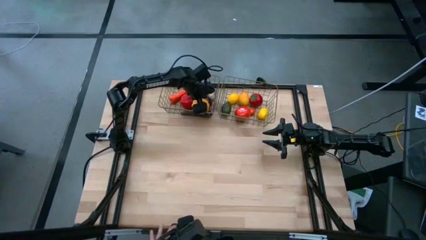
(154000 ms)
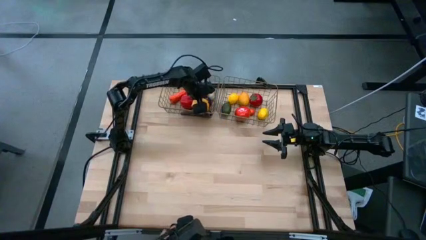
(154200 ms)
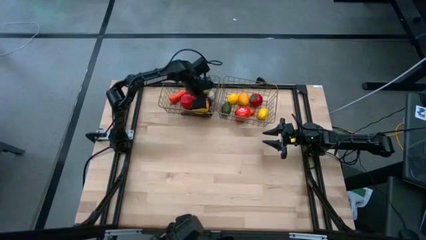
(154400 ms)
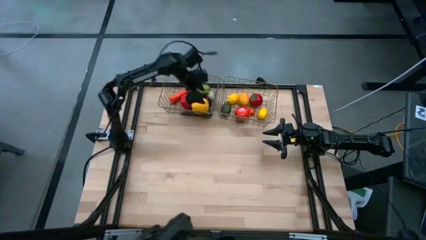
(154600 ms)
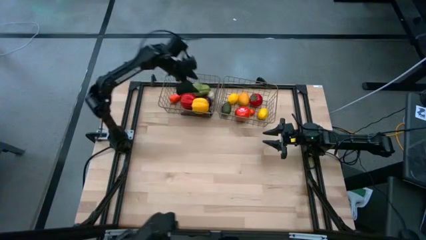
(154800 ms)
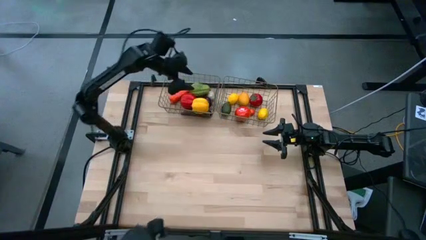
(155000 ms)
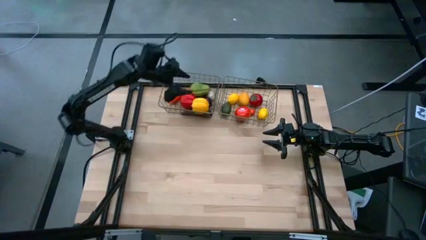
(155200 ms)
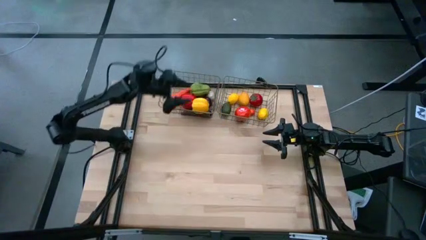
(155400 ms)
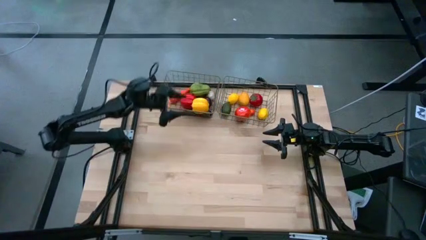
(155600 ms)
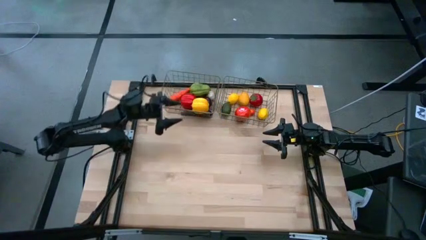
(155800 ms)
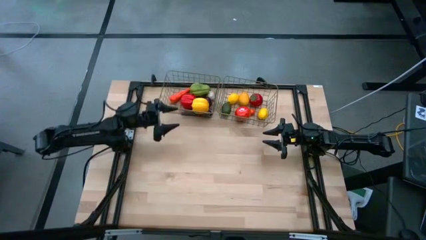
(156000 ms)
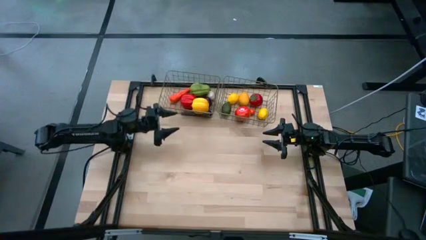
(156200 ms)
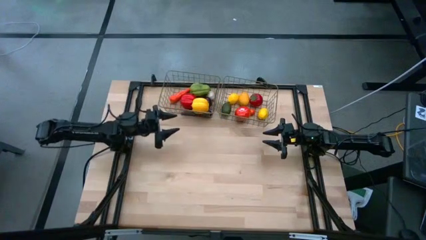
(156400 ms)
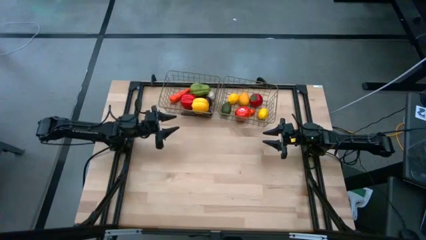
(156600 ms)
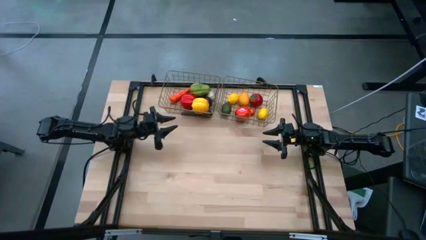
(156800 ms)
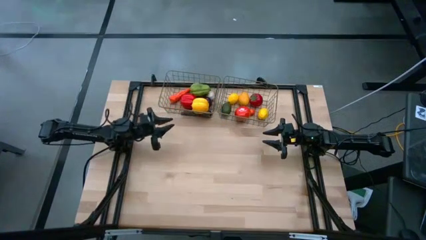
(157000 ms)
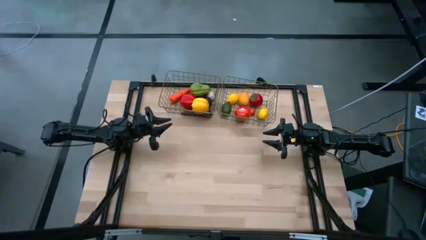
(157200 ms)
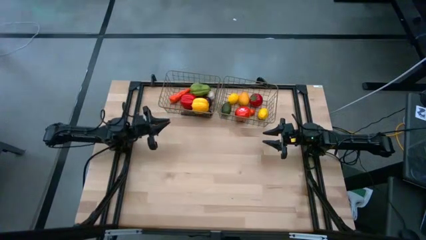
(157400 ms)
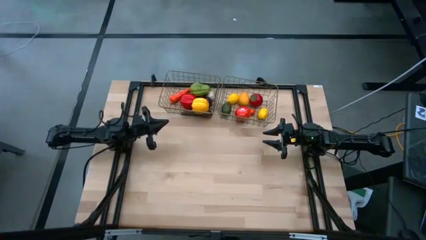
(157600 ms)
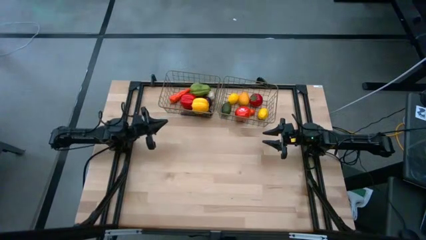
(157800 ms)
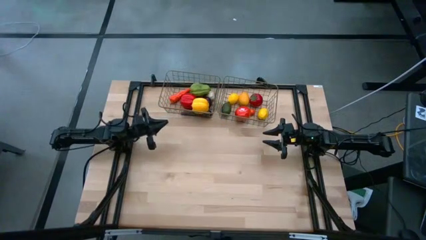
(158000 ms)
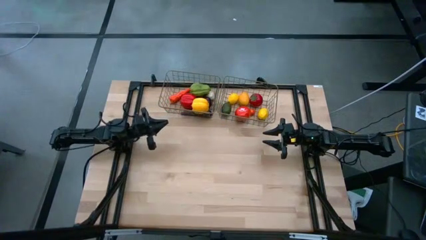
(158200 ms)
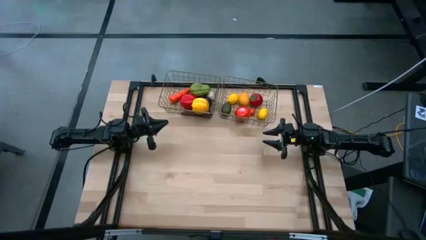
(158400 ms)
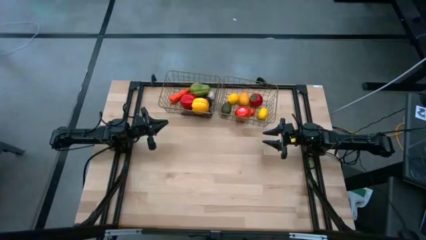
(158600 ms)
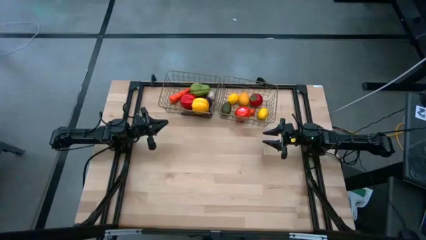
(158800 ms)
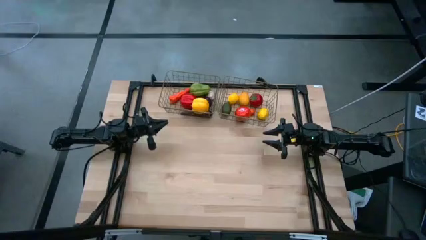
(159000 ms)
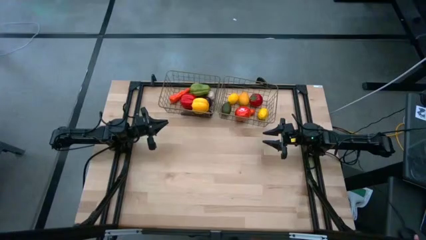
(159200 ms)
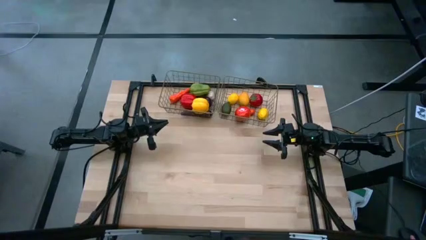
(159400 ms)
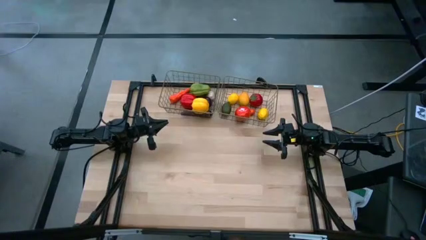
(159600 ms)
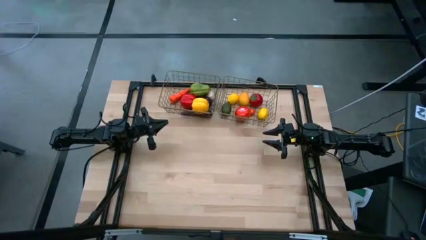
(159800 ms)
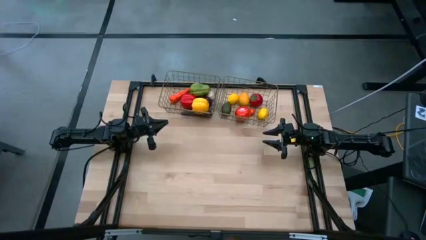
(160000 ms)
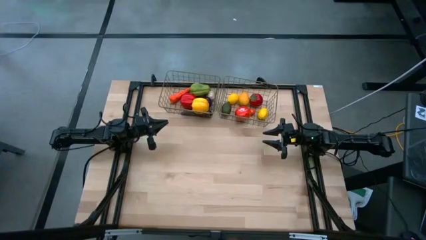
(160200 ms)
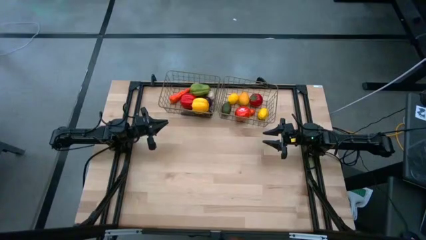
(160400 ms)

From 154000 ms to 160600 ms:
Task: Sort produce into baskets
Return to Home Position

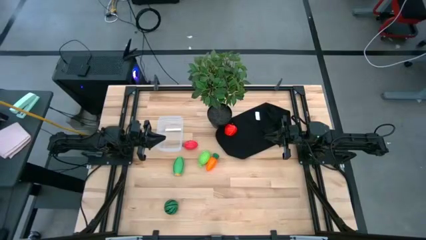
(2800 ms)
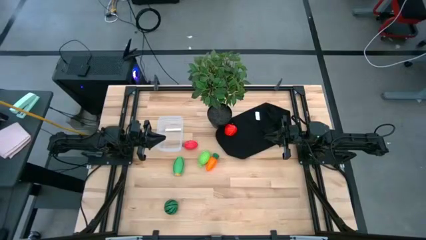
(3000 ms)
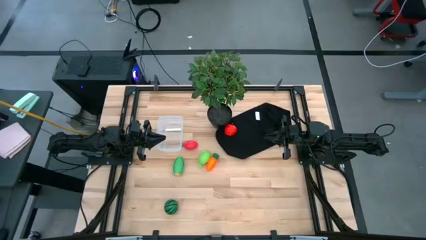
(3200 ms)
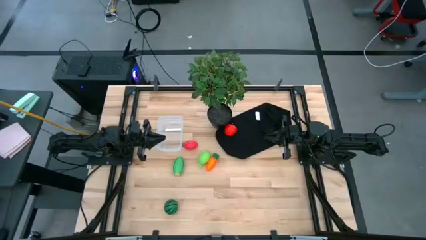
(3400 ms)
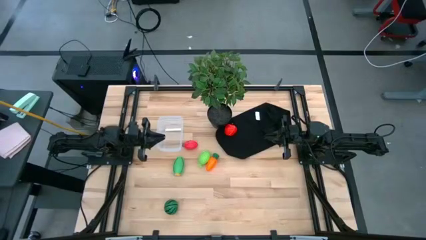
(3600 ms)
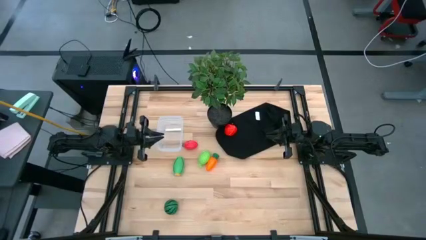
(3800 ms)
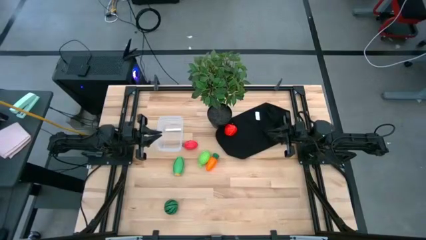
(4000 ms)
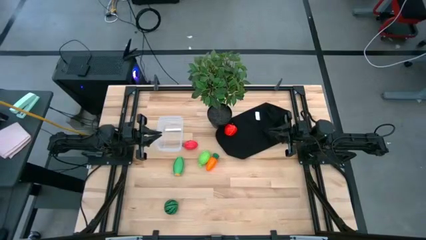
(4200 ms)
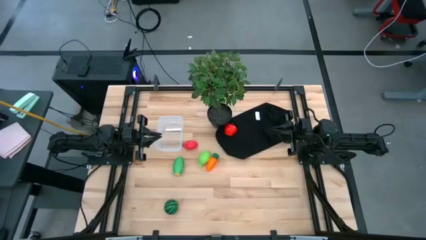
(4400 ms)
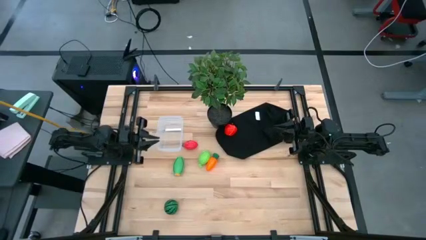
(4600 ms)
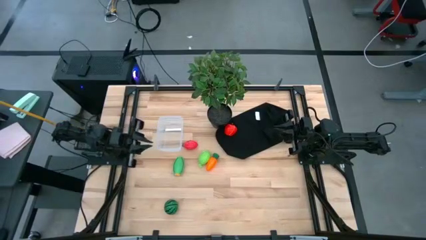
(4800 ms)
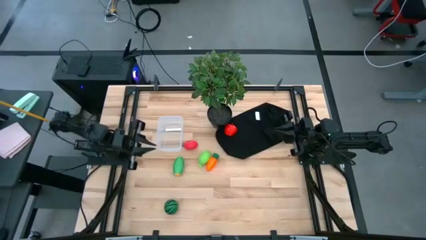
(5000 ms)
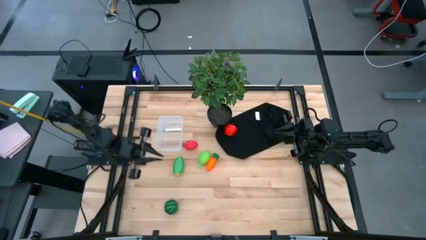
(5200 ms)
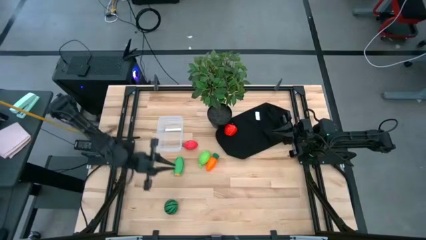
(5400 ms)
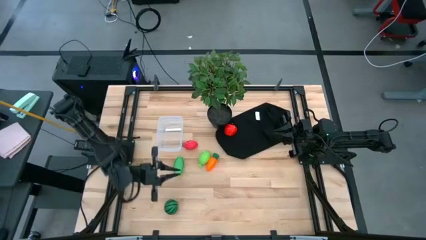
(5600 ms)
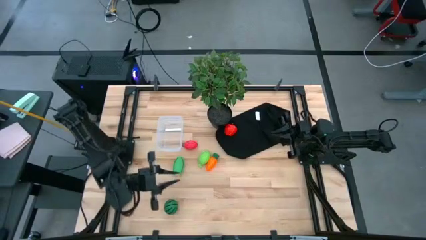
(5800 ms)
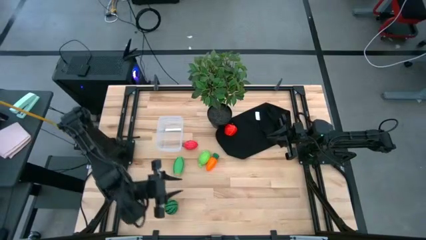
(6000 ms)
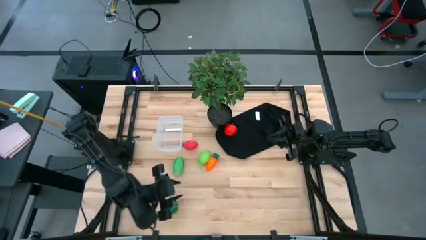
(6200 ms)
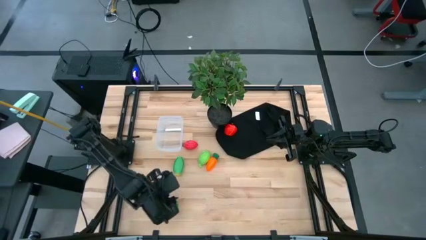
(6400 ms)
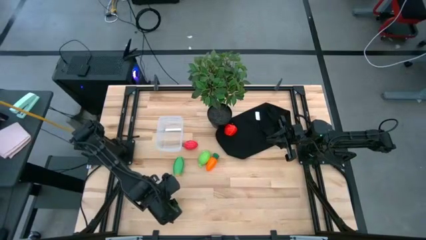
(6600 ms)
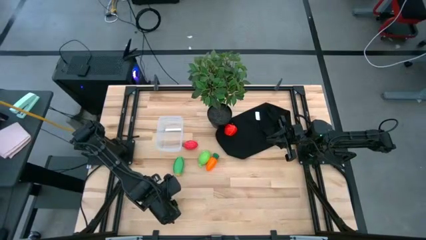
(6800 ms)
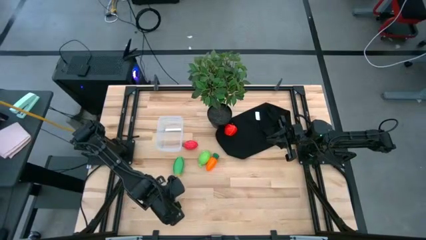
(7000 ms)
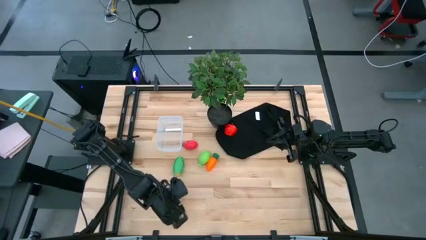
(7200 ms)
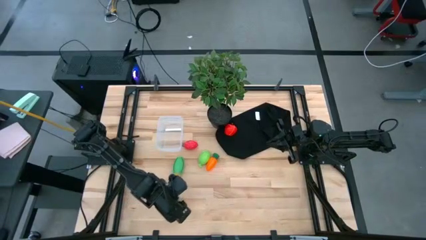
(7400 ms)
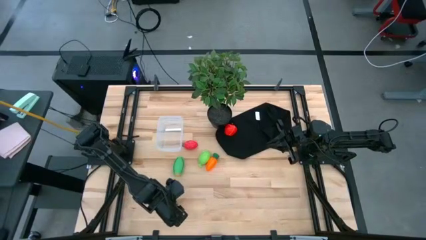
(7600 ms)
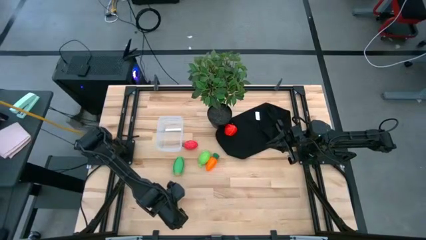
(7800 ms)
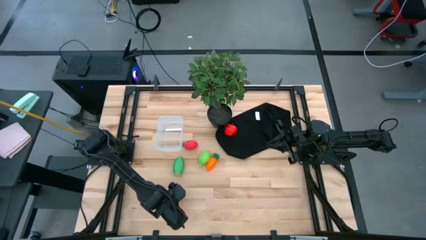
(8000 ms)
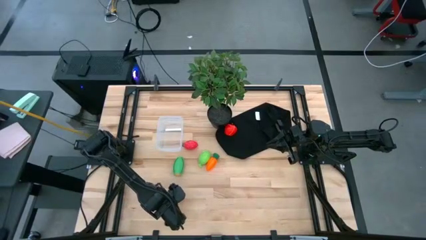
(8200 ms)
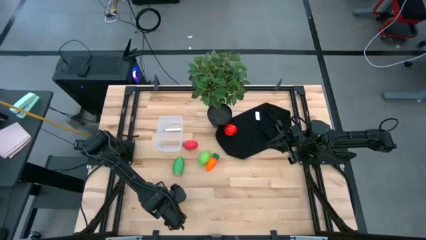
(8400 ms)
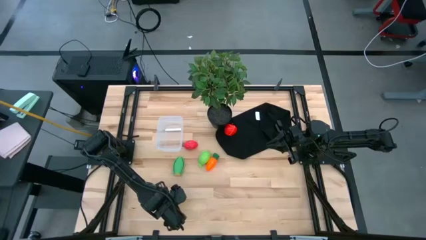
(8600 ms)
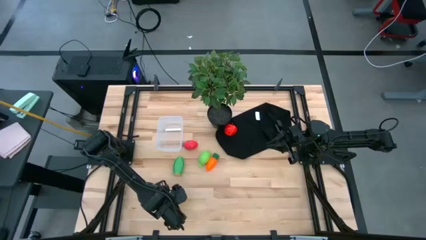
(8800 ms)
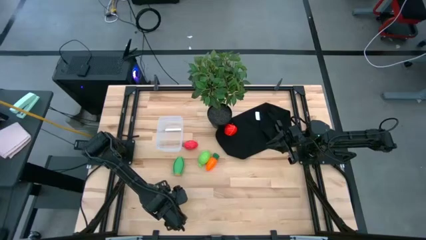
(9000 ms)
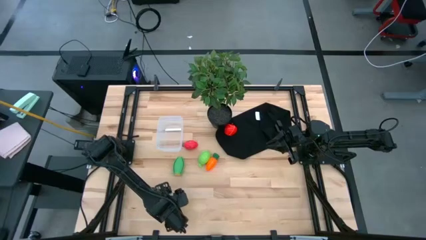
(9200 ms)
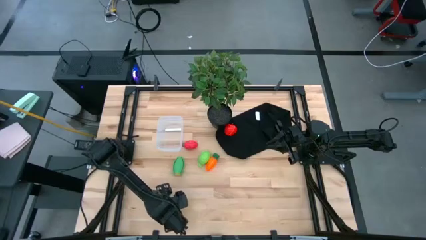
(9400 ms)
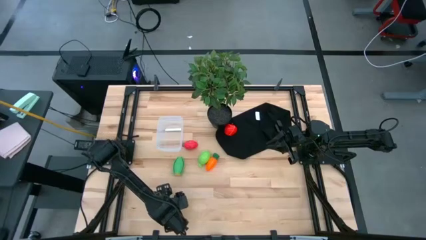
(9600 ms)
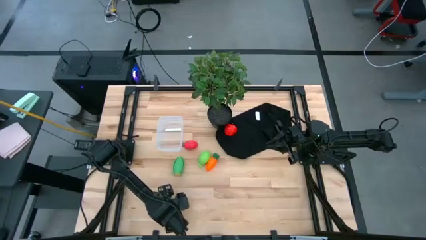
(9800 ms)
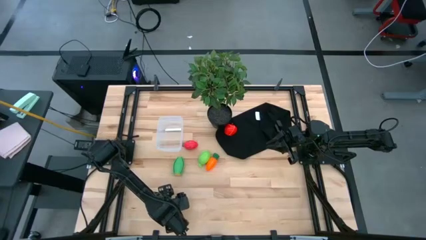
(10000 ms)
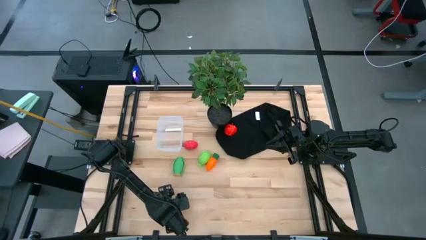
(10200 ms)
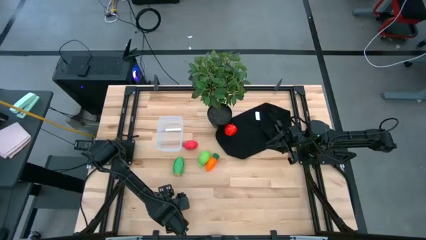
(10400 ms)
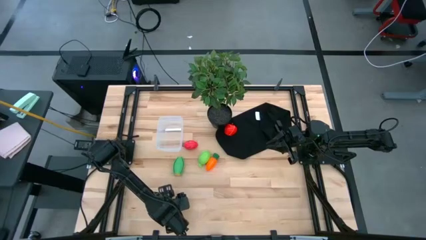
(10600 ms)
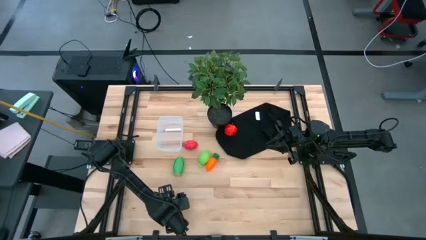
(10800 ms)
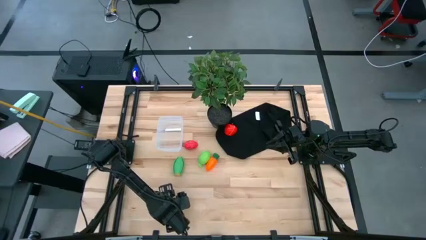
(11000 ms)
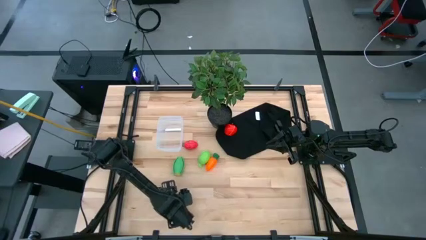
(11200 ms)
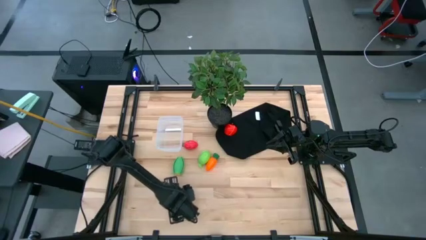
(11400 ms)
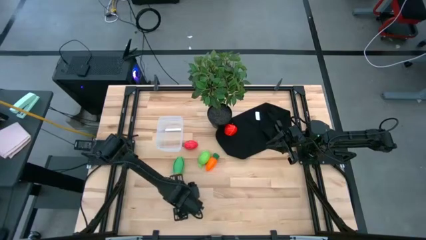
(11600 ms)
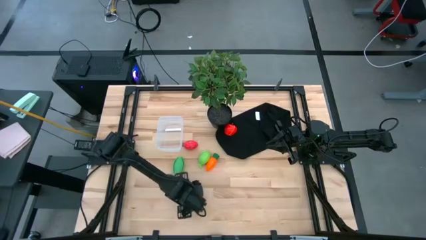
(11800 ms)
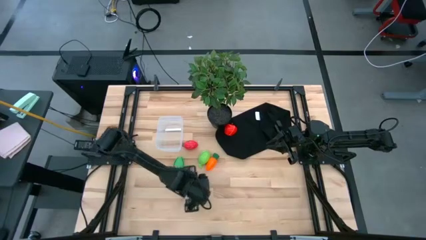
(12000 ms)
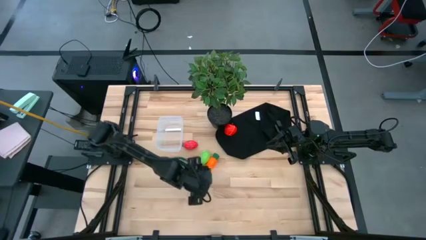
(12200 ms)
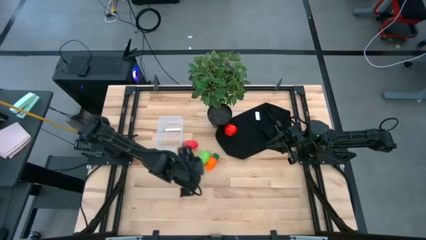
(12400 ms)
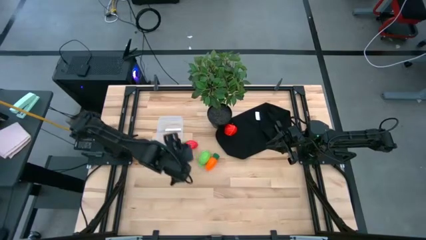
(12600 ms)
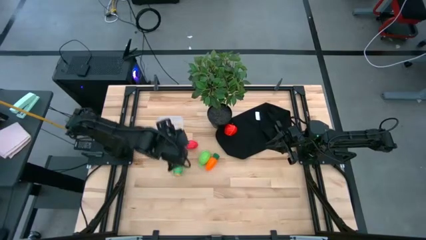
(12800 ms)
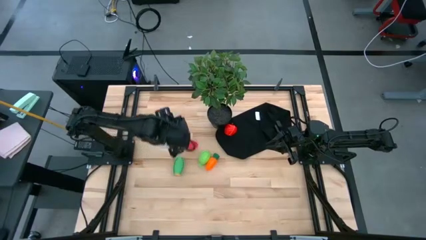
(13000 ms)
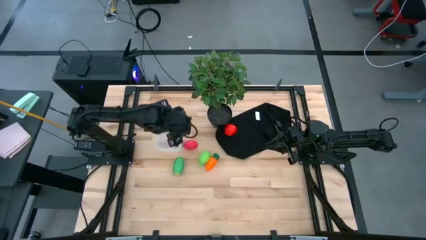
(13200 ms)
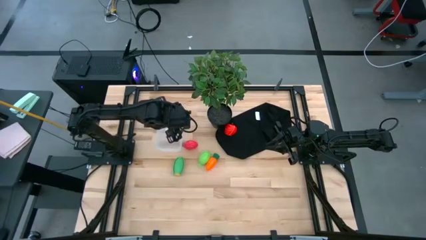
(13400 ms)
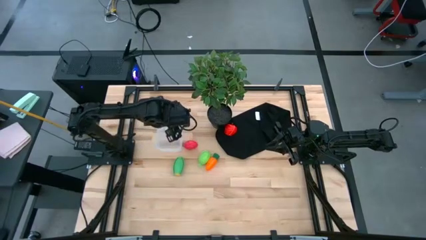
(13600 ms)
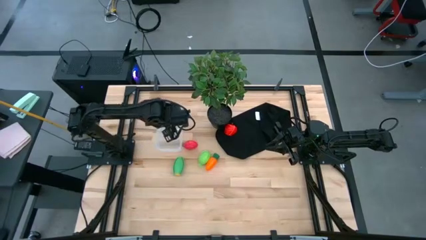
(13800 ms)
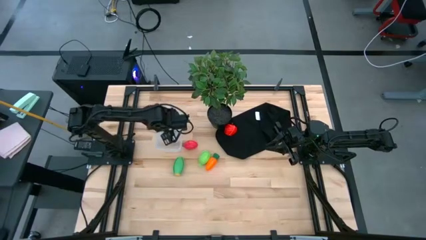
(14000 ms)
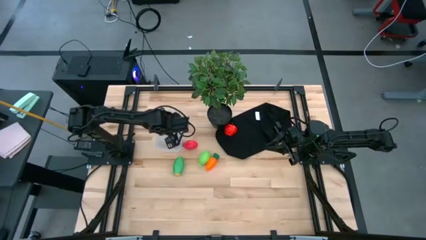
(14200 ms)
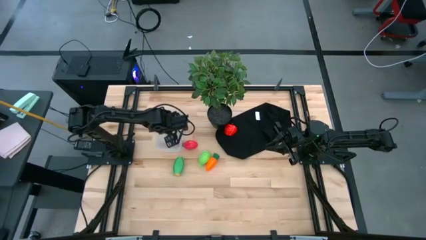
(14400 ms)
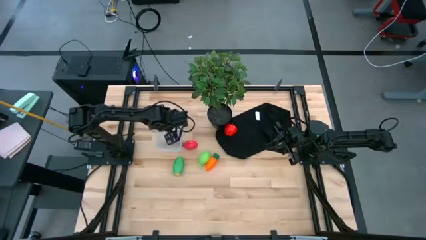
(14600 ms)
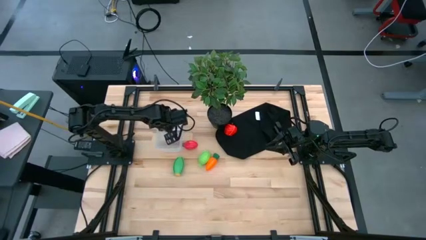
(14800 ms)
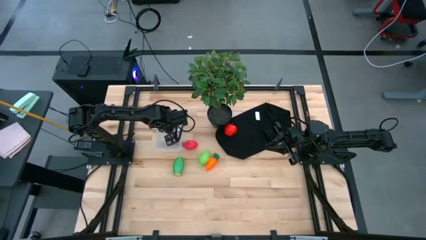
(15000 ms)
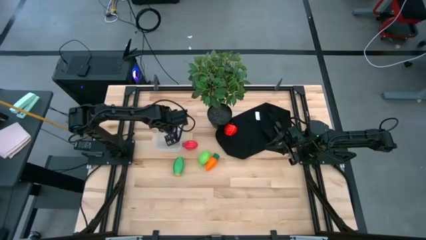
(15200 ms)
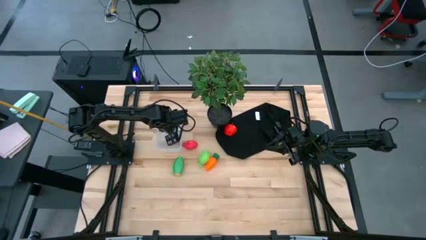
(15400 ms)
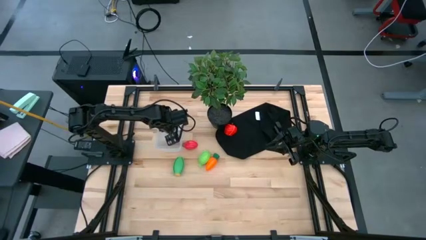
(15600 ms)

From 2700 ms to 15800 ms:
Task: Pick and placing Produce into tupperware
Put the watermelon into the bin
